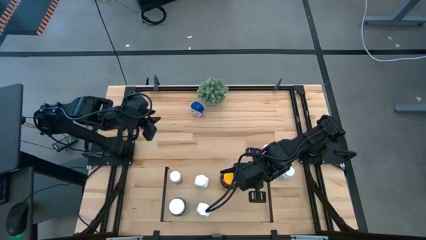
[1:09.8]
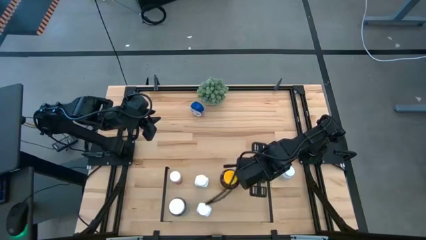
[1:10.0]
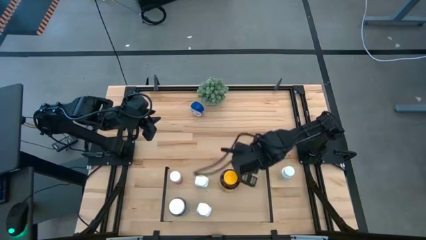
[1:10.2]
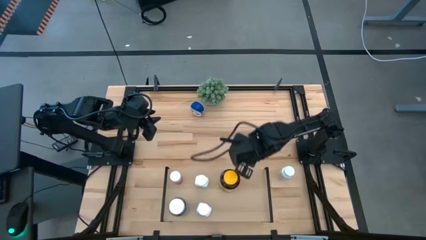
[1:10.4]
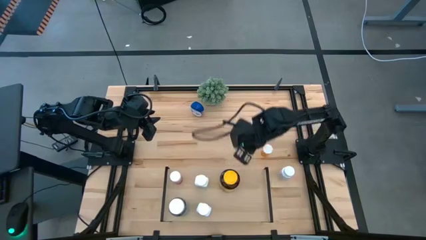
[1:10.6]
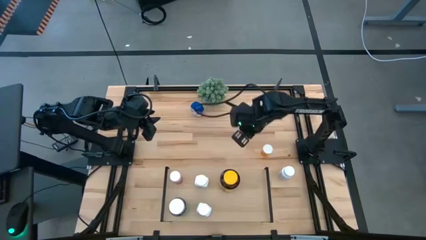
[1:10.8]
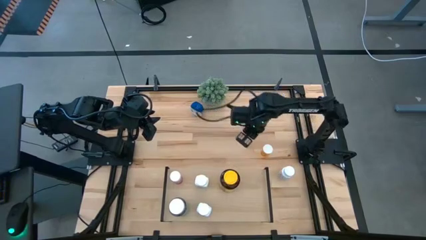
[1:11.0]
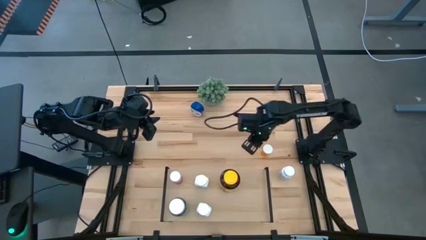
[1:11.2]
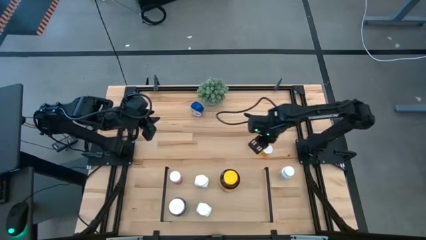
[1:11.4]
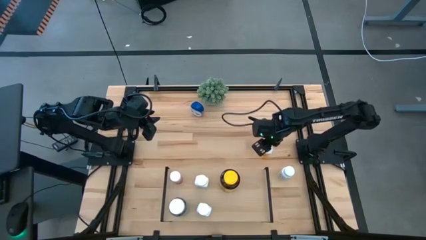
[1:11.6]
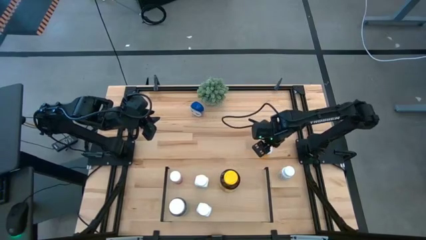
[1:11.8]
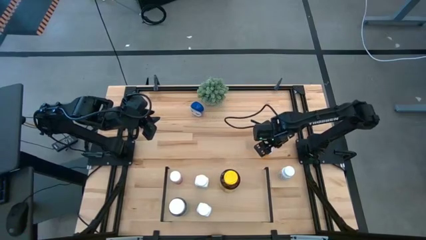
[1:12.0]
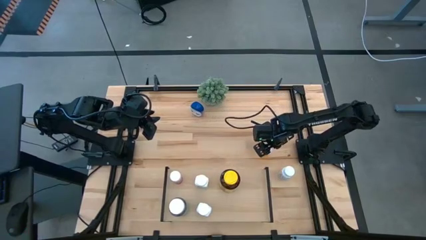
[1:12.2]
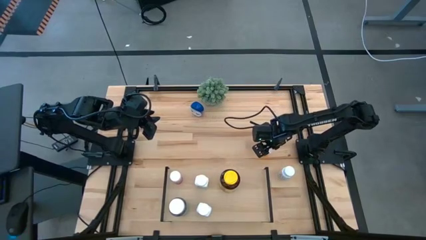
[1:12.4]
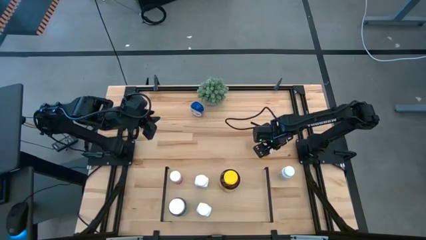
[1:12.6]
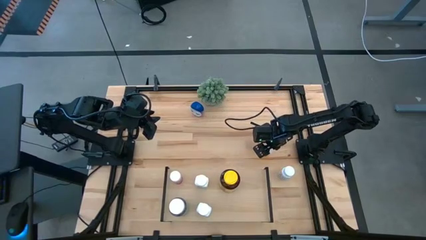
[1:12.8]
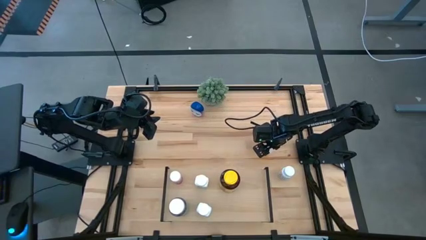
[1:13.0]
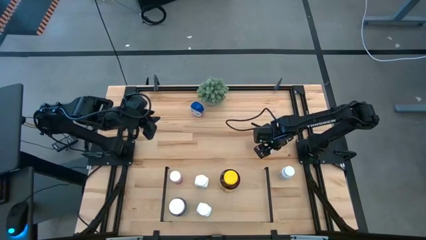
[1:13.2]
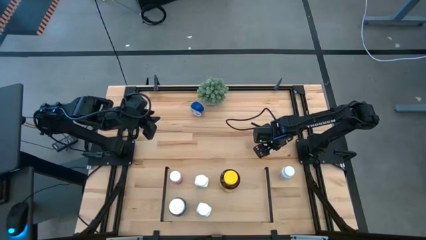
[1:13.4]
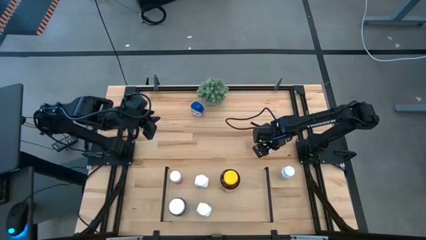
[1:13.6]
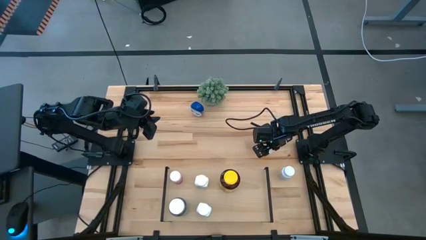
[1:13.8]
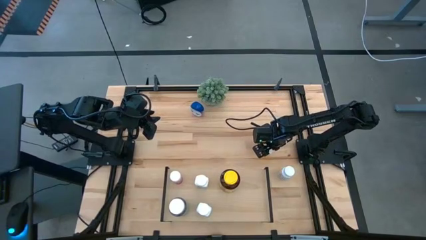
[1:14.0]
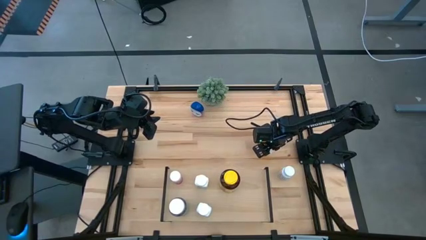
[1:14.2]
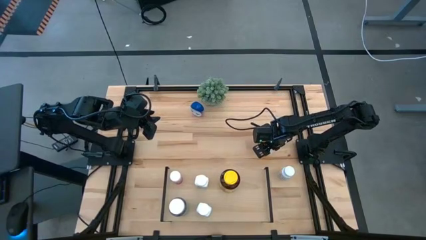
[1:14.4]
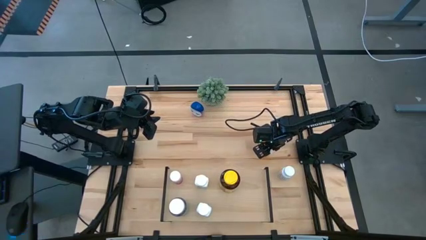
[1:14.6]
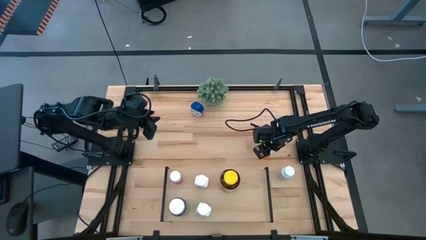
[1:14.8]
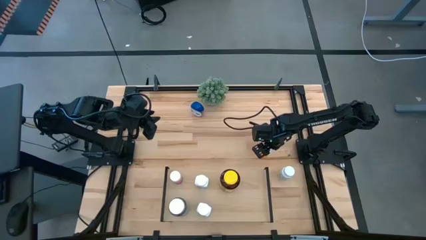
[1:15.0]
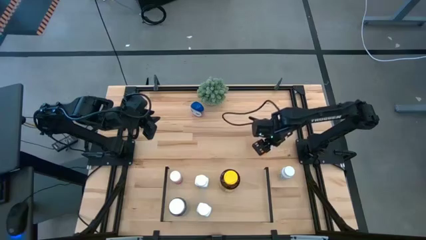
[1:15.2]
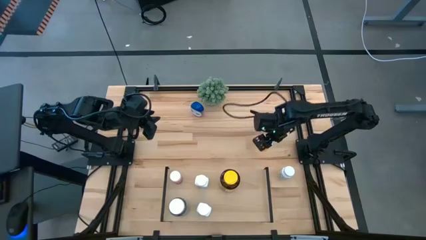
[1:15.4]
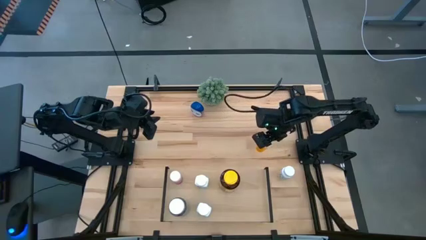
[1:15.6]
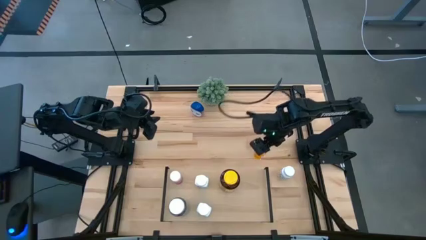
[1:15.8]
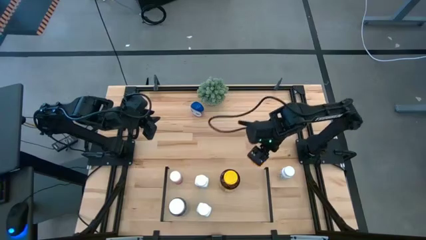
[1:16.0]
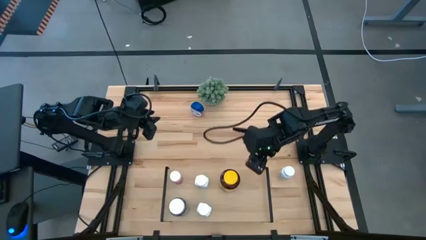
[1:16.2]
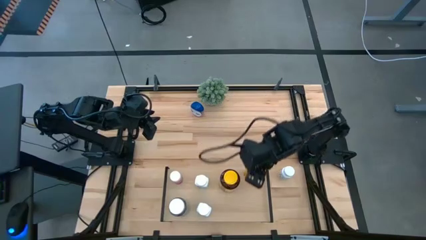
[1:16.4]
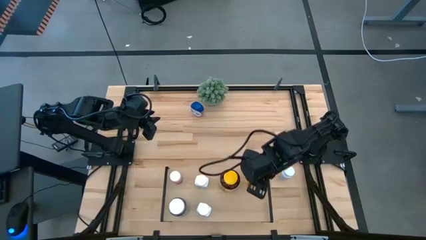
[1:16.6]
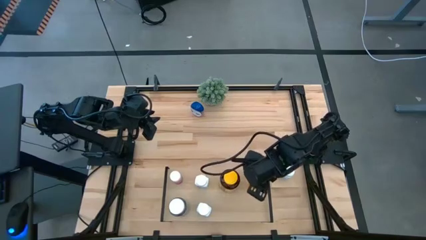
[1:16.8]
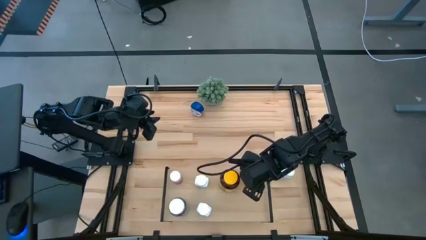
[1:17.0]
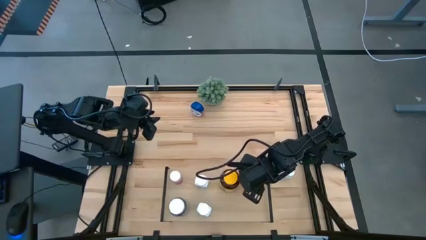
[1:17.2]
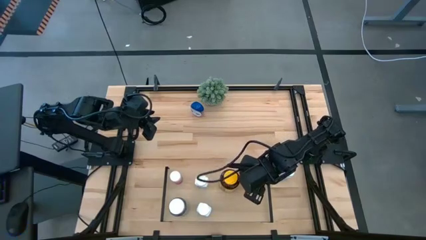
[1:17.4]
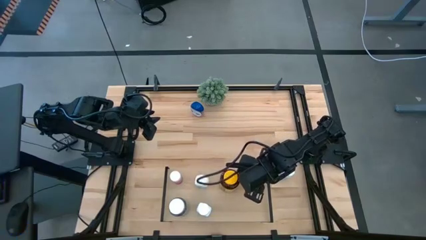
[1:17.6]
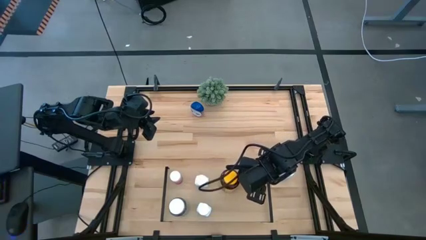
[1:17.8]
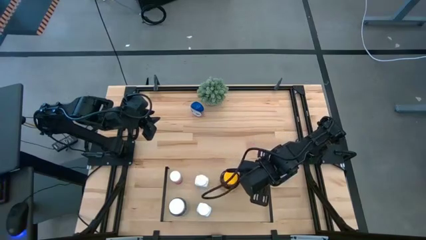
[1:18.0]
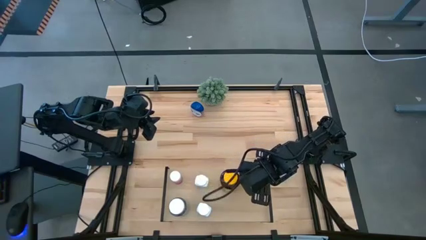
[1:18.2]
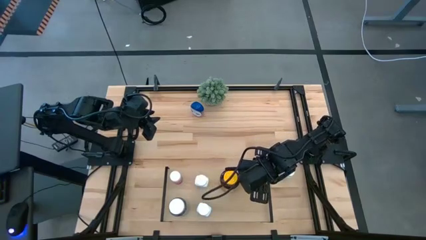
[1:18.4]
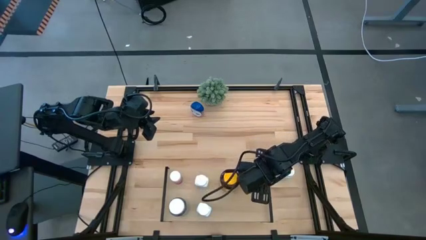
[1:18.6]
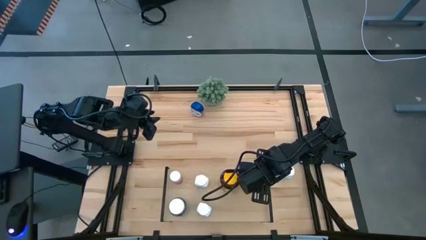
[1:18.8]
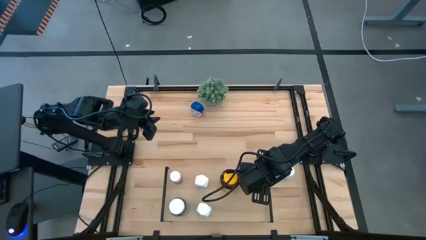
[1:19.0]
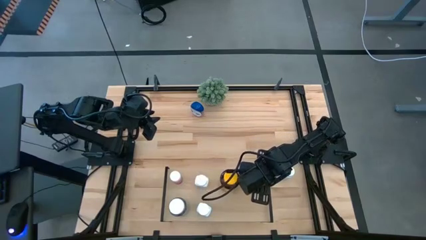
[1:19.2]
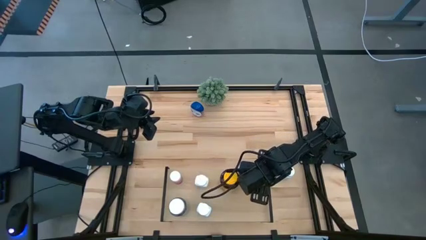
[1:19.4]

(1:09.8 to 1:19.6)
Task: Pick and place medicine bottles onto shelf by color
Put the orange pill bottle on the shelf
